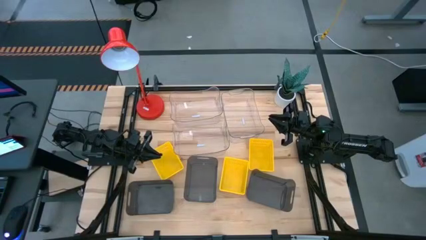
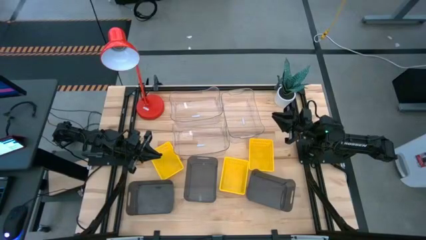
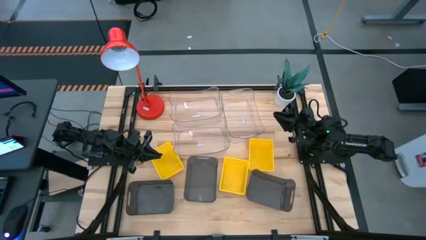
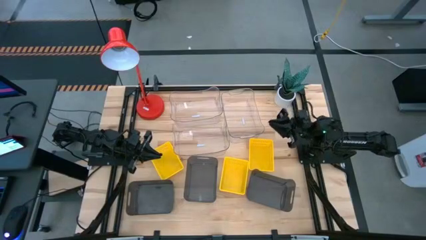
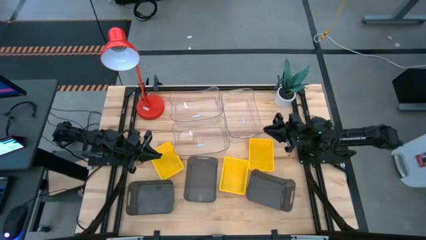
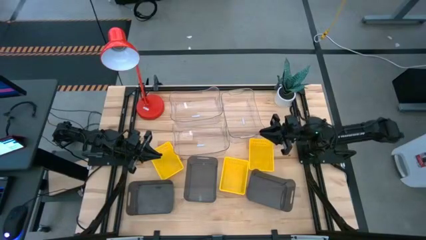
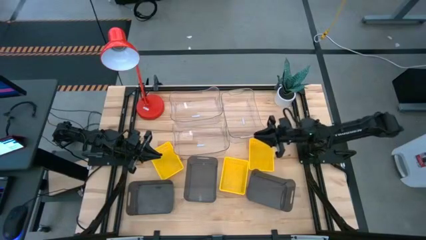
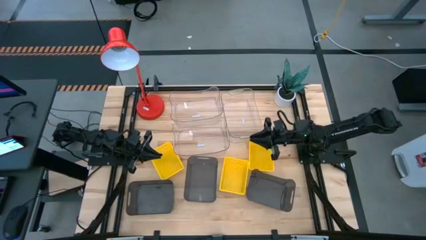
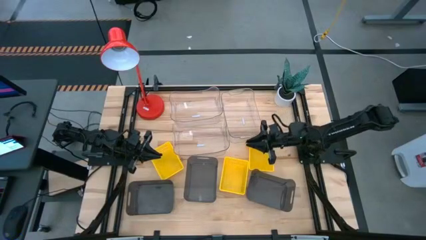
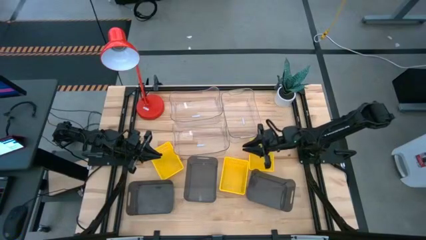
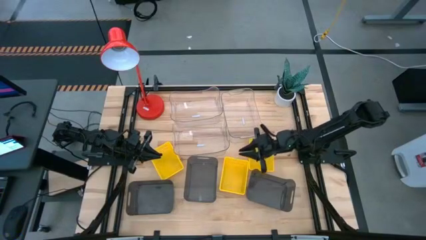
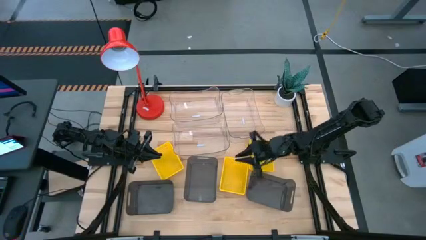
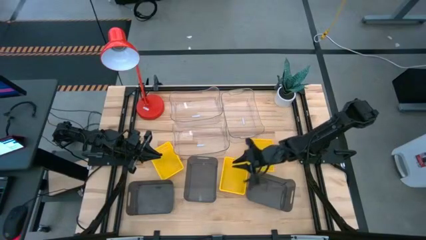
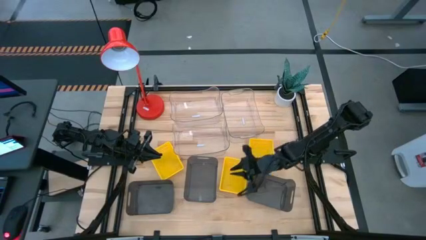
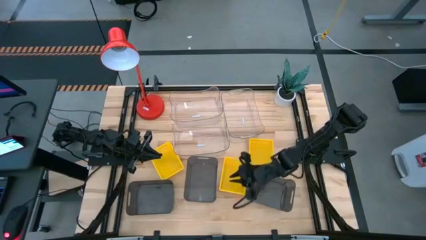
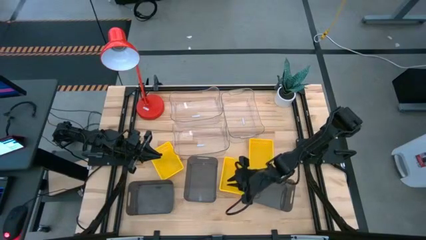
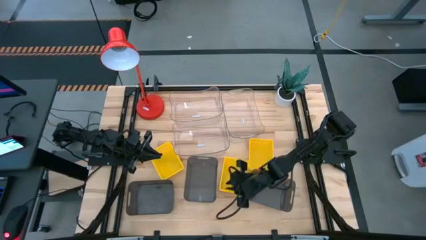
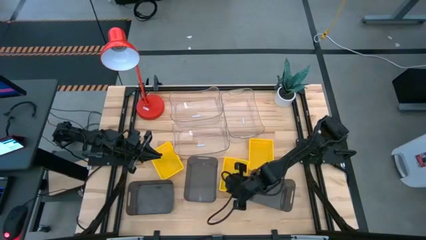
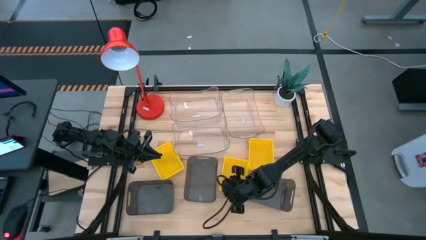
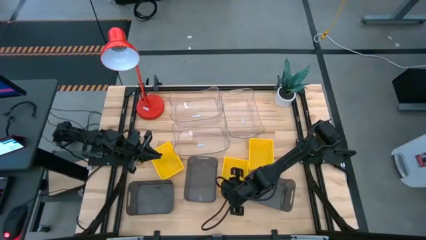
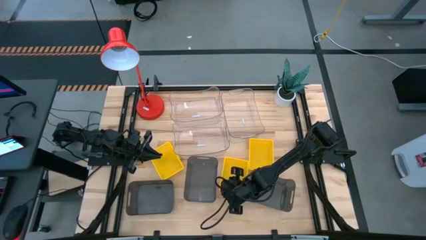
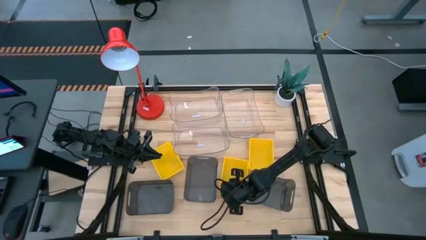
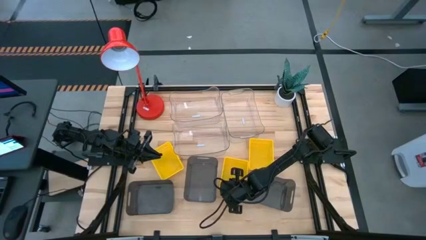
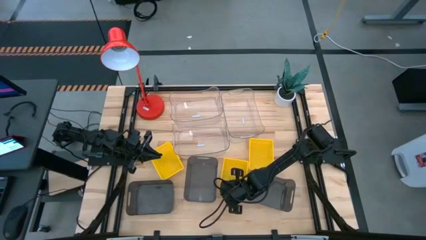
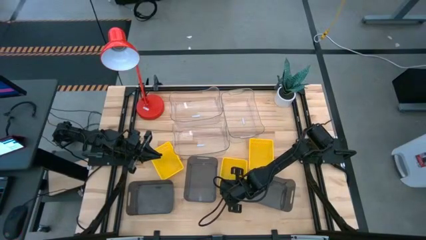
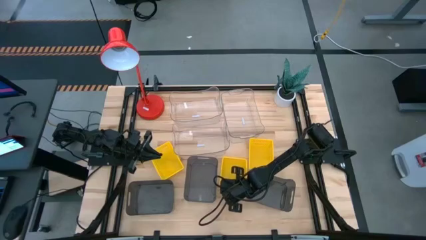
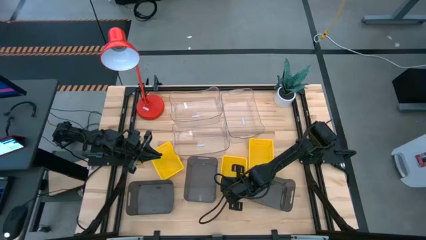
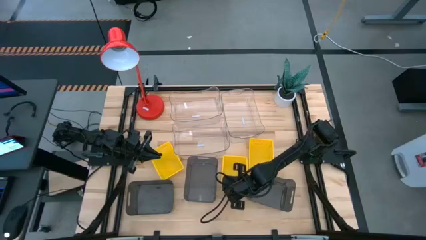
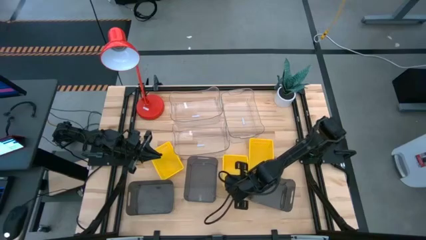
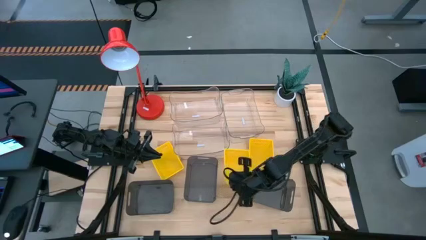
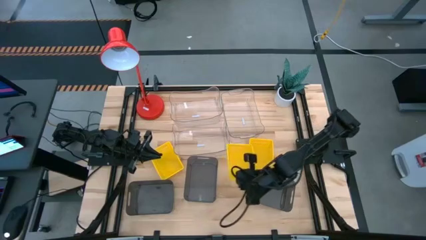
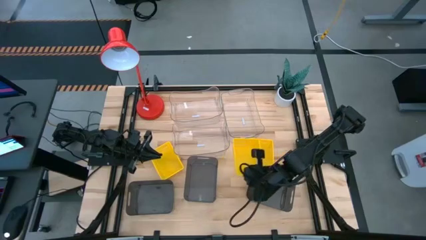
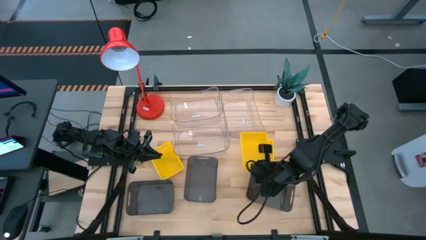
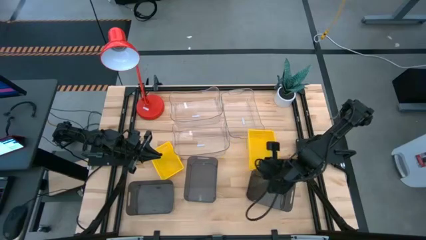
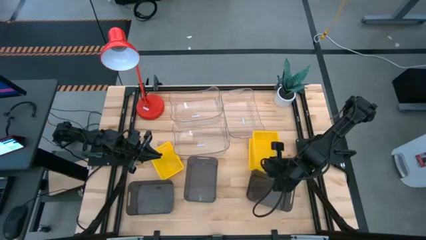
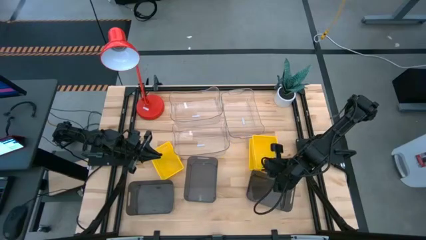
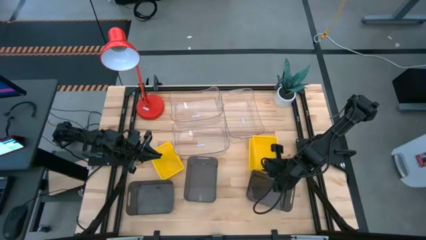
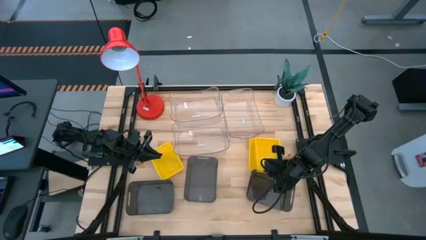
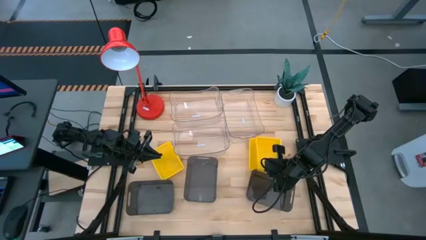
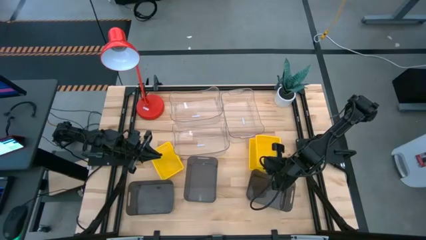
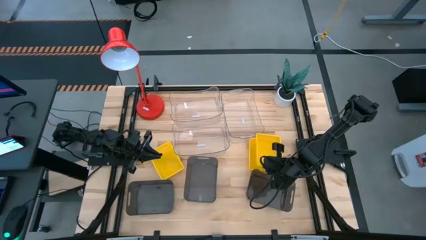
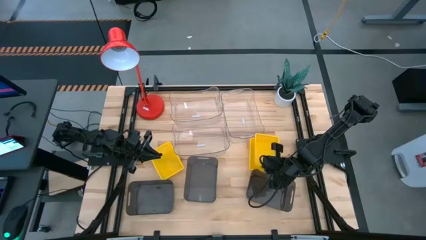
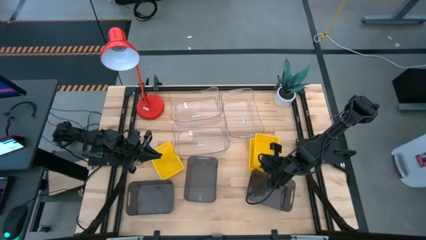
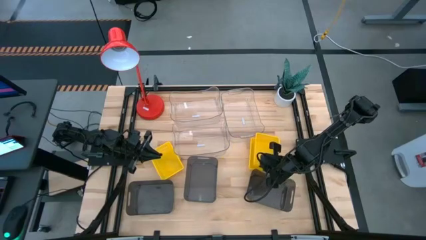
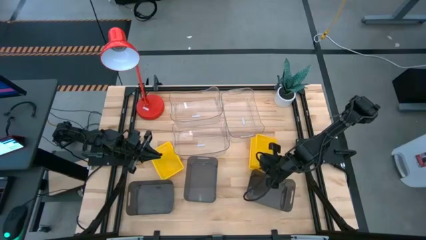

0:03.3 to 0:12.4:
Stack the middle yellow bin on top of the right yellow bin

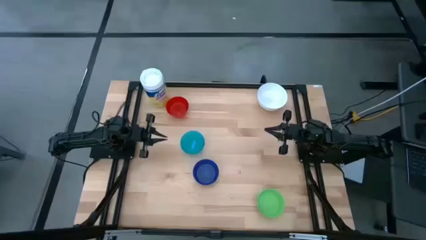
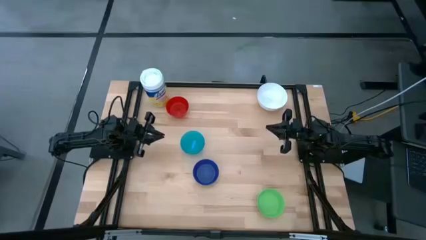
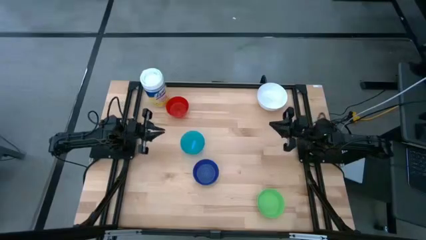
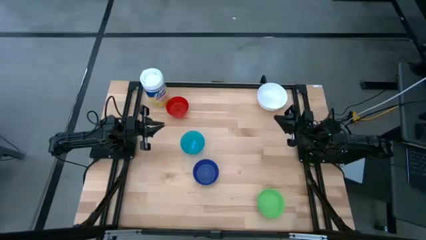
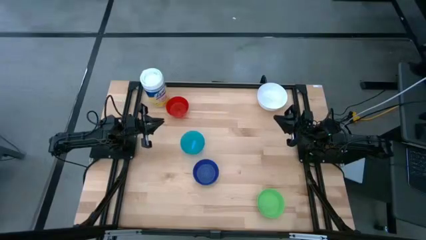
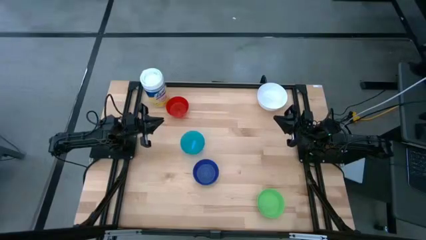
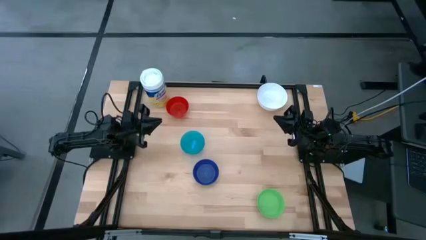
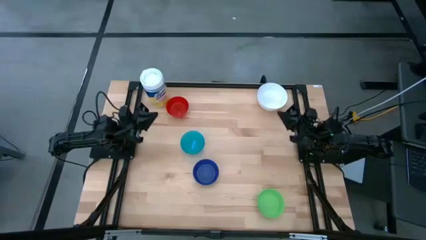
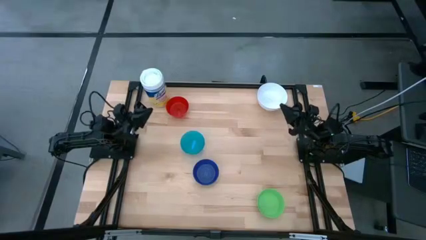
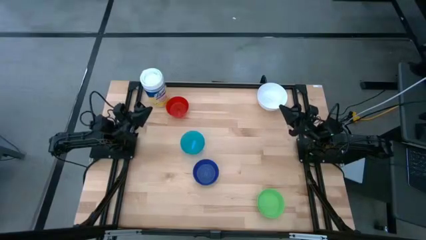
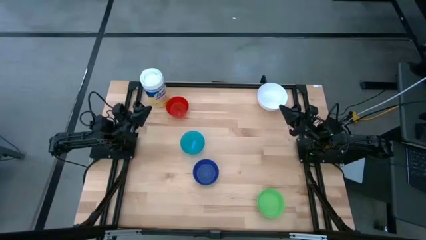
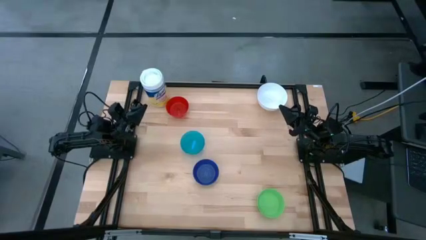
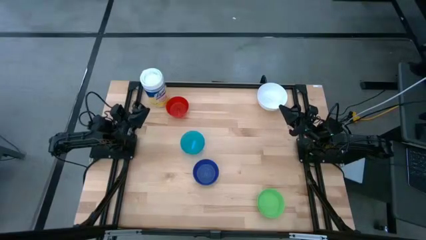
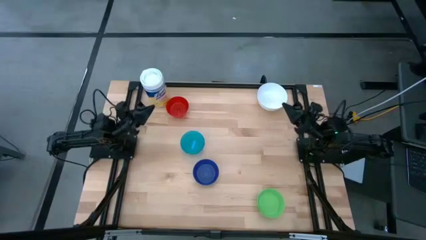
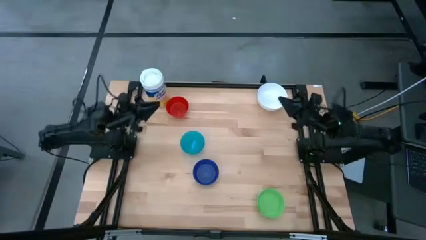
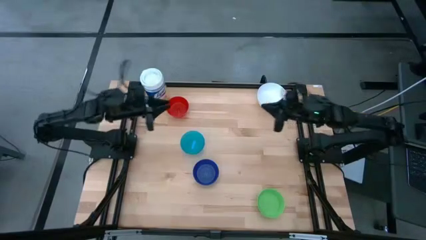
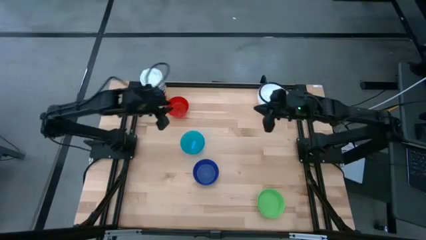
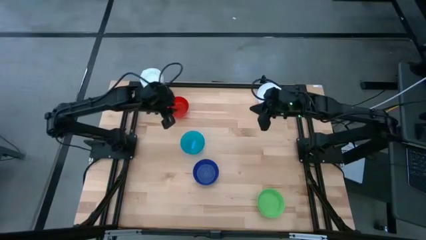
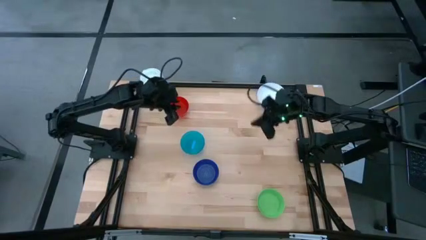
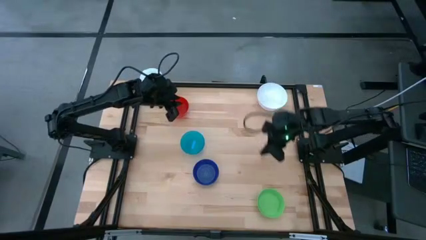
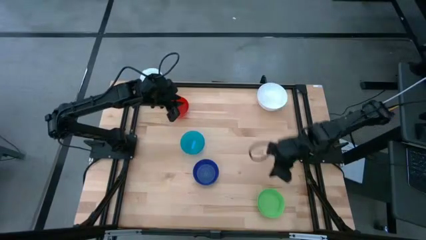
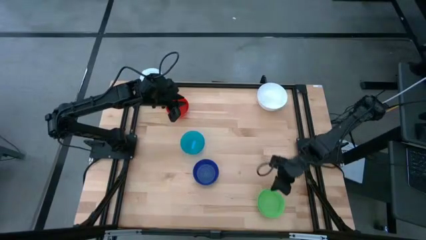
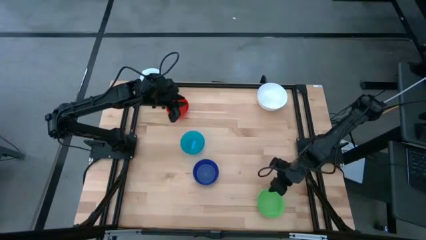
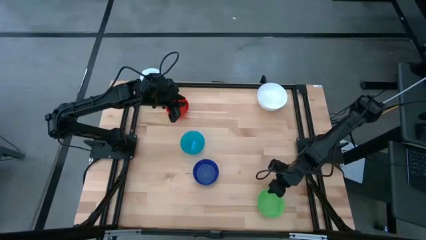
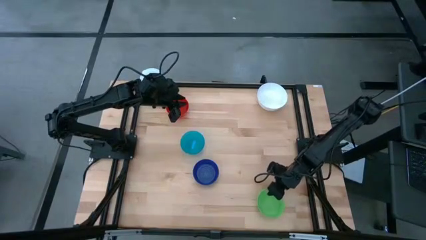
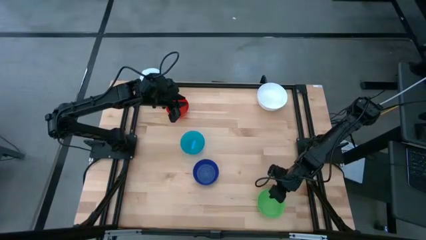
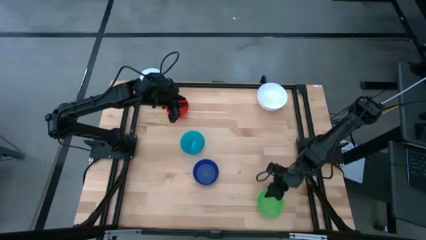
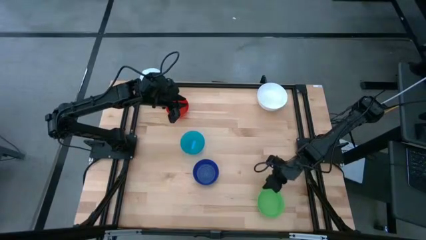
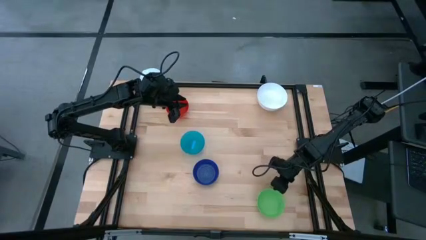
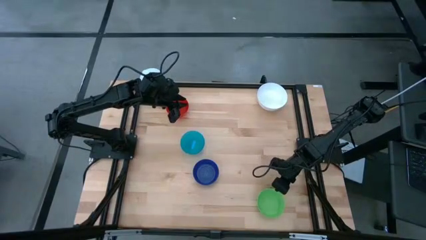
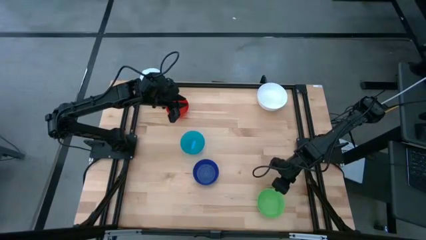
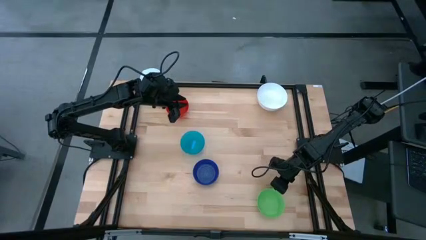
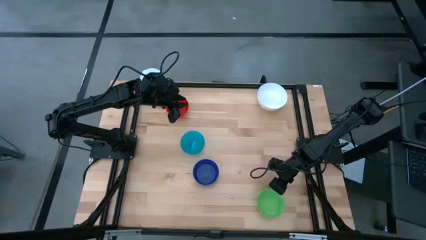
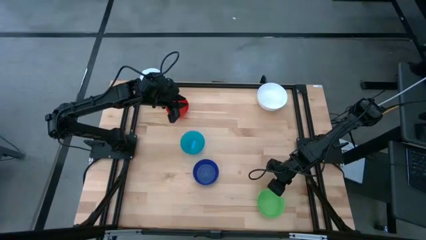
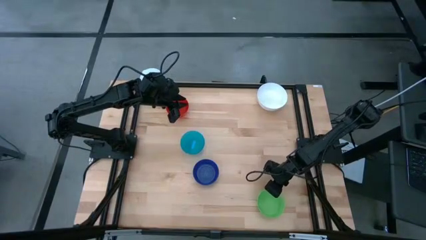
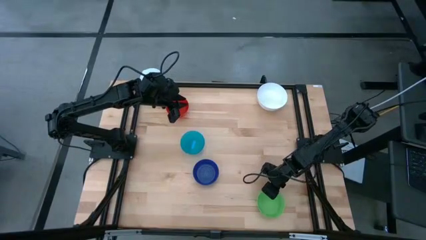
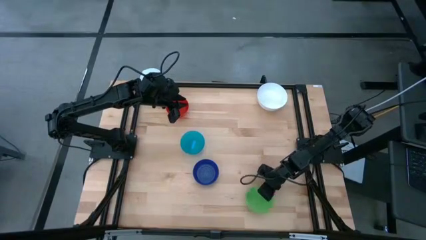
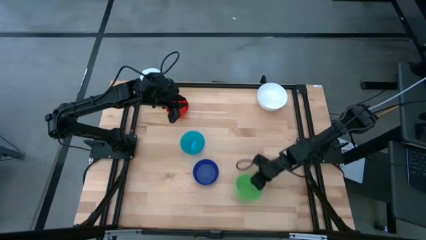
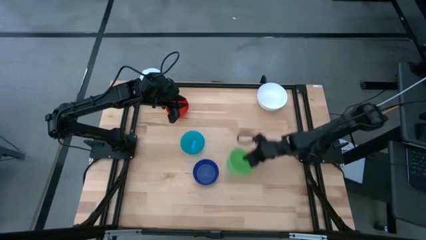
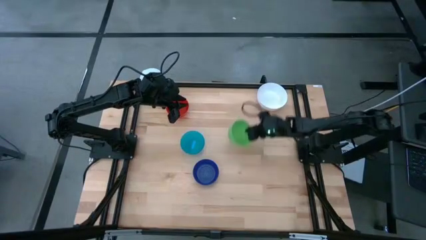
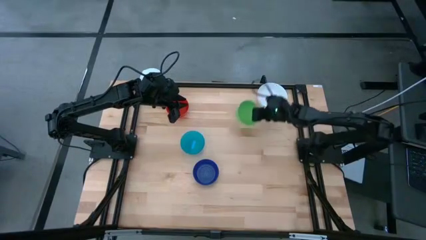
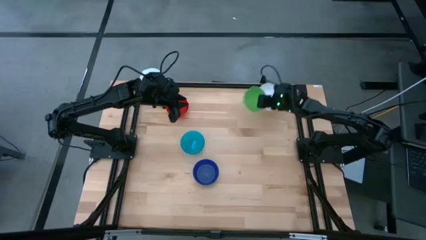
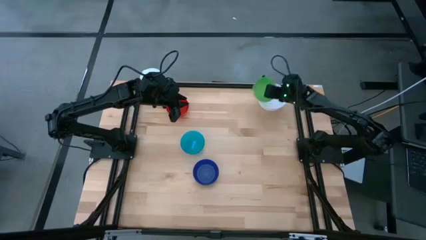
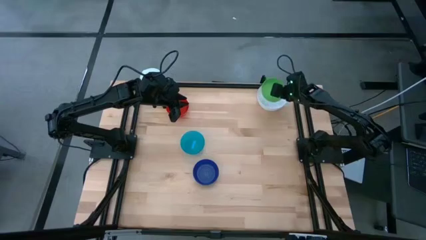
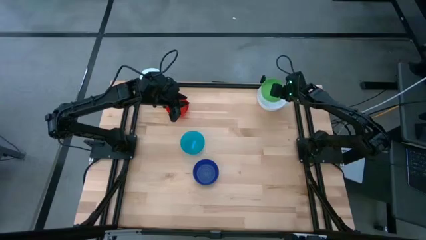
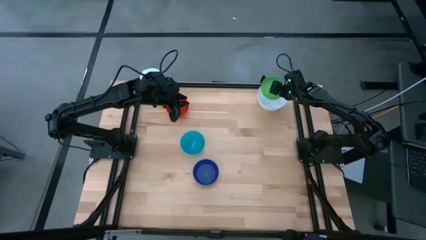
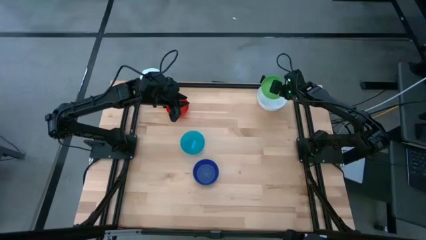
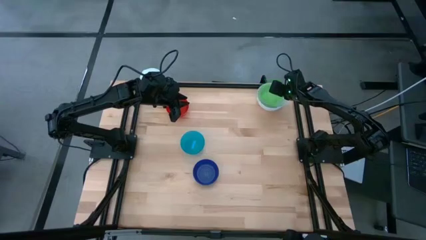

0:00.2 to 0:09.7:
Stack the green bowl on the white bowl
